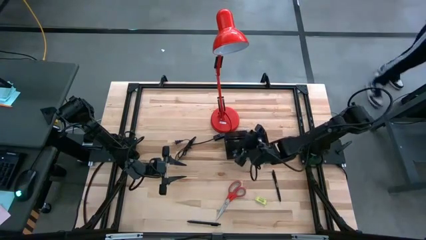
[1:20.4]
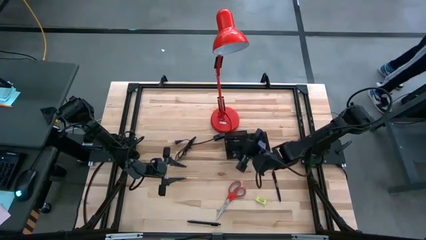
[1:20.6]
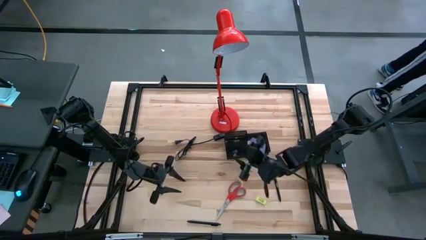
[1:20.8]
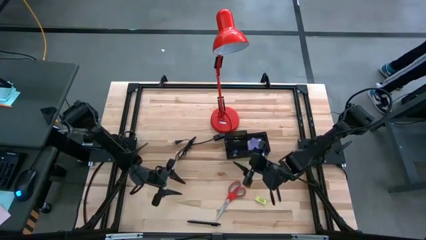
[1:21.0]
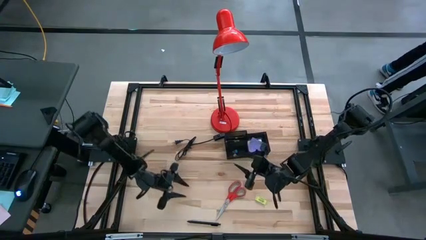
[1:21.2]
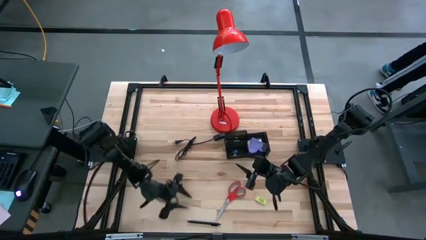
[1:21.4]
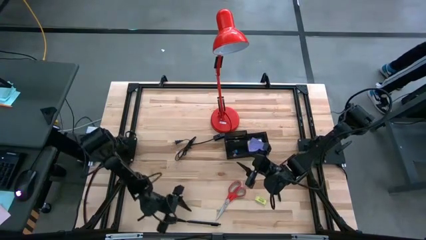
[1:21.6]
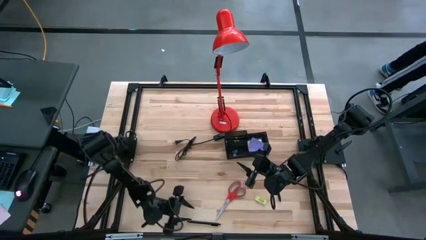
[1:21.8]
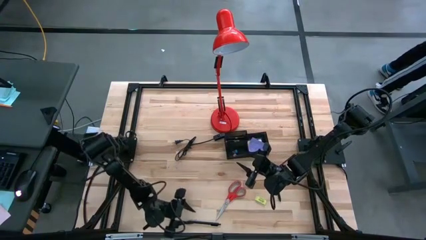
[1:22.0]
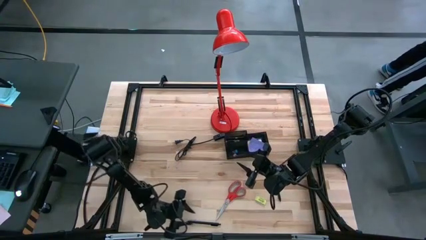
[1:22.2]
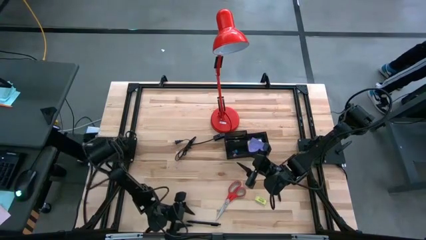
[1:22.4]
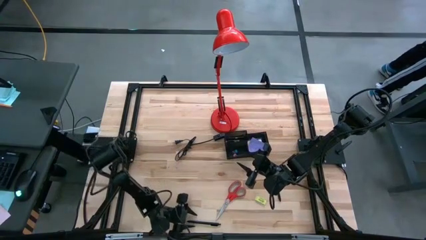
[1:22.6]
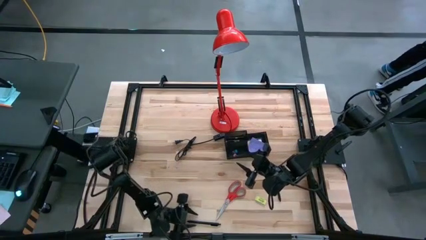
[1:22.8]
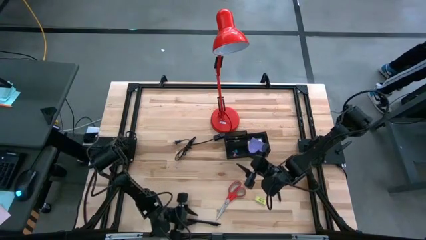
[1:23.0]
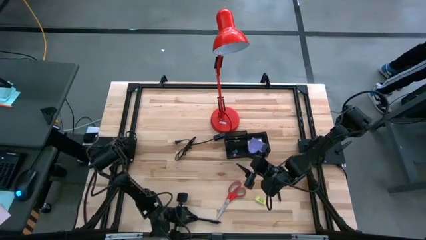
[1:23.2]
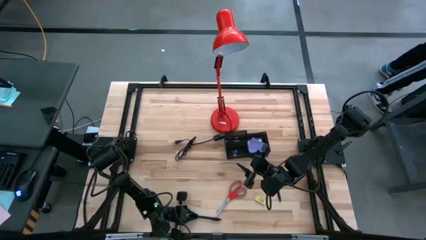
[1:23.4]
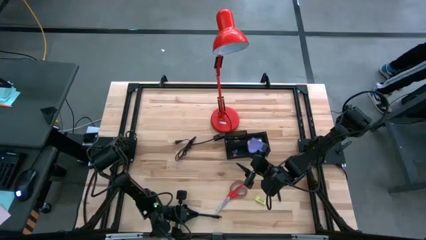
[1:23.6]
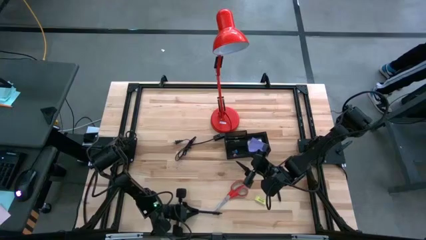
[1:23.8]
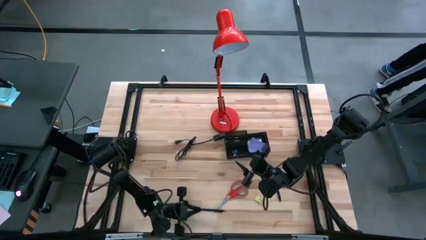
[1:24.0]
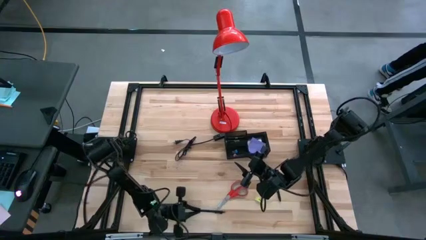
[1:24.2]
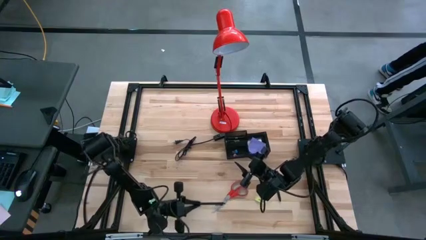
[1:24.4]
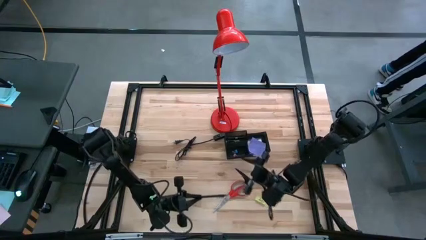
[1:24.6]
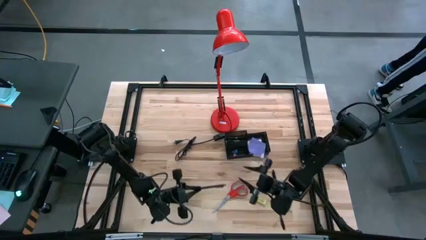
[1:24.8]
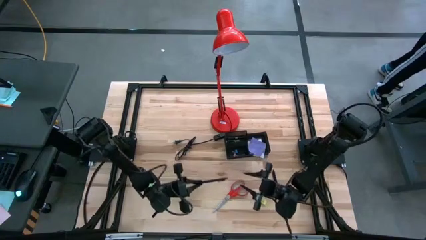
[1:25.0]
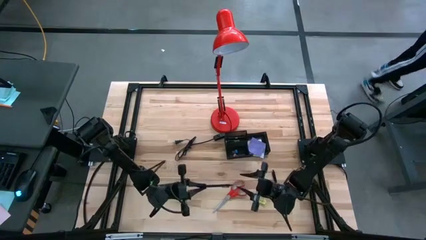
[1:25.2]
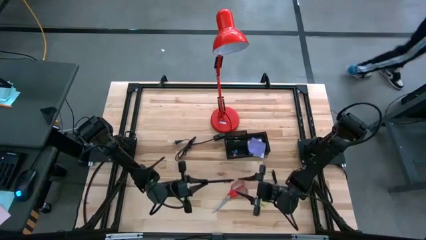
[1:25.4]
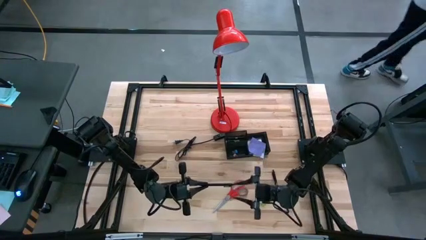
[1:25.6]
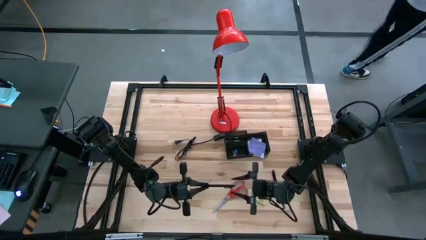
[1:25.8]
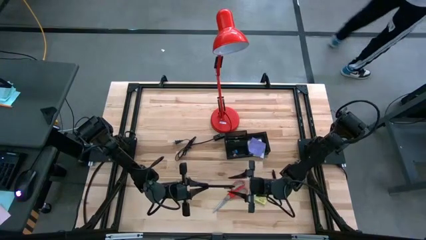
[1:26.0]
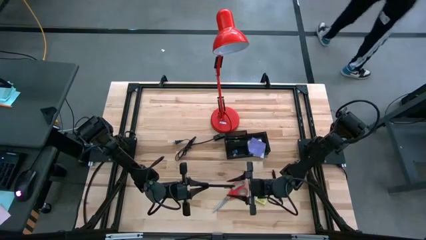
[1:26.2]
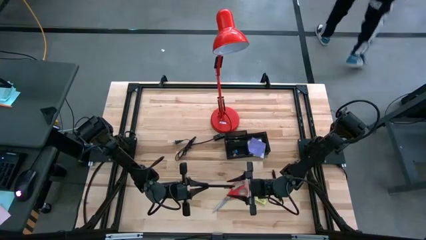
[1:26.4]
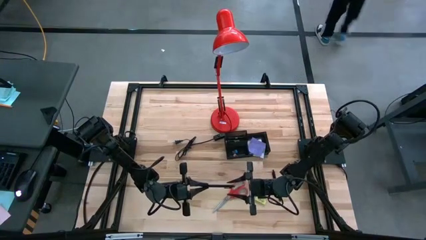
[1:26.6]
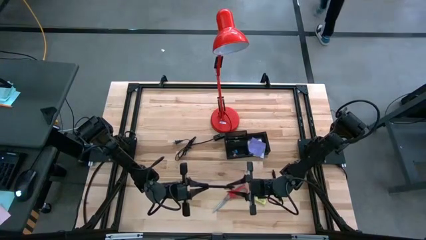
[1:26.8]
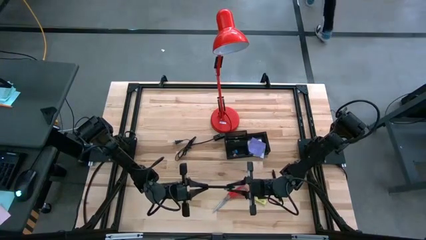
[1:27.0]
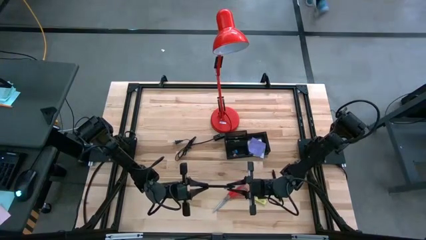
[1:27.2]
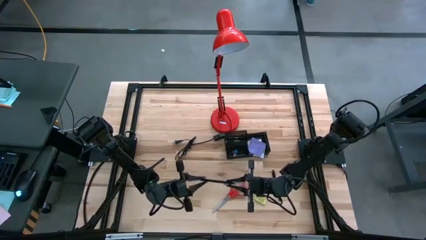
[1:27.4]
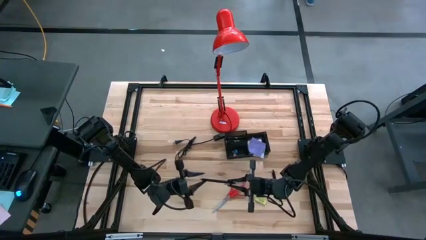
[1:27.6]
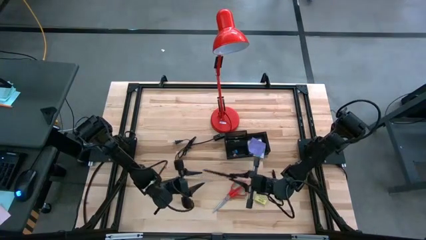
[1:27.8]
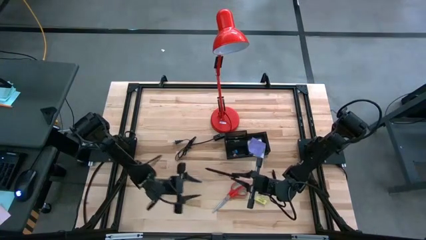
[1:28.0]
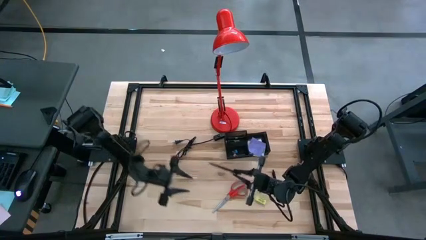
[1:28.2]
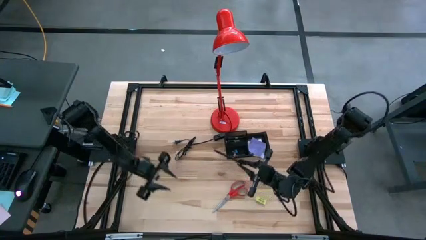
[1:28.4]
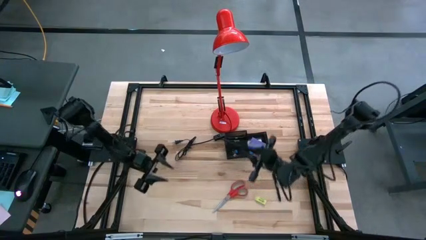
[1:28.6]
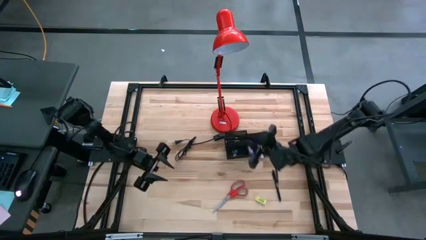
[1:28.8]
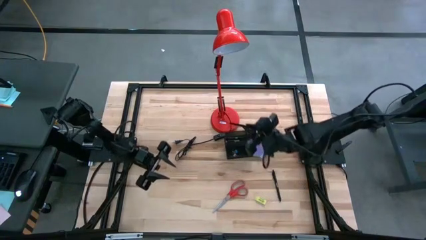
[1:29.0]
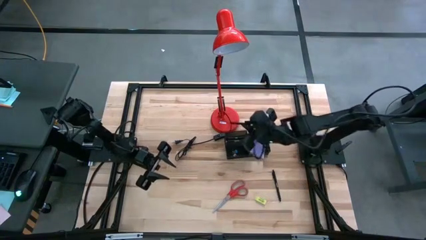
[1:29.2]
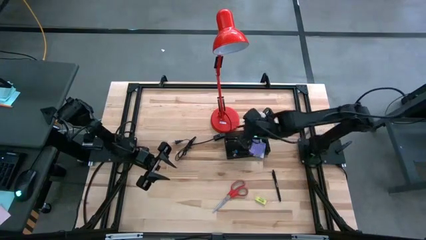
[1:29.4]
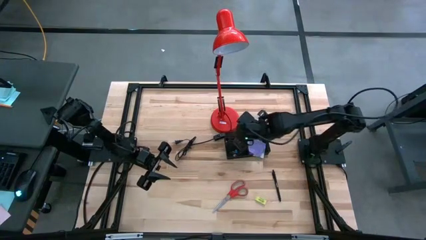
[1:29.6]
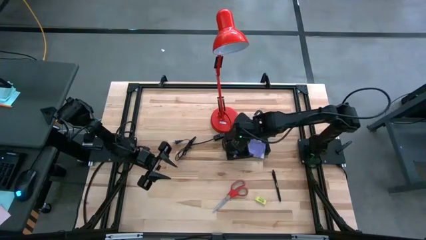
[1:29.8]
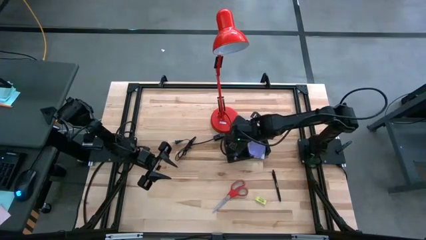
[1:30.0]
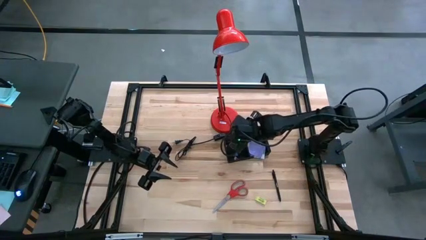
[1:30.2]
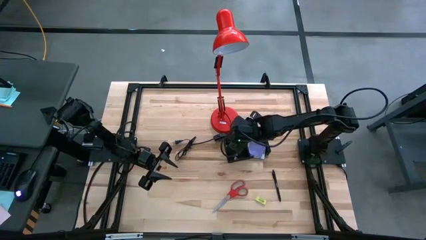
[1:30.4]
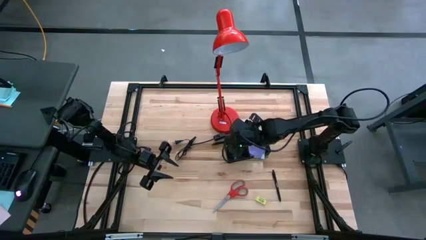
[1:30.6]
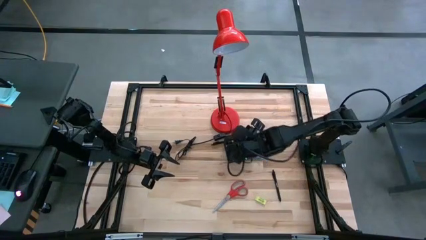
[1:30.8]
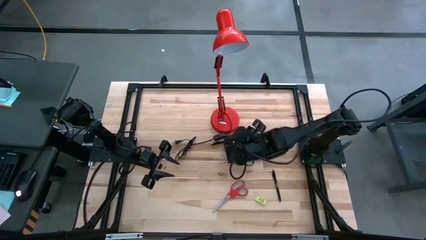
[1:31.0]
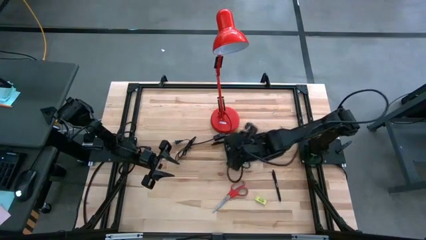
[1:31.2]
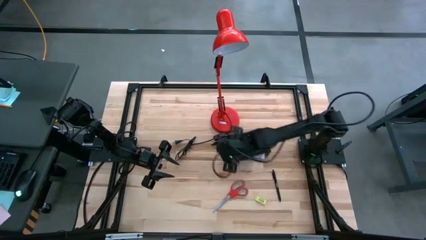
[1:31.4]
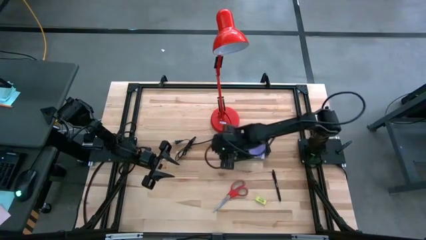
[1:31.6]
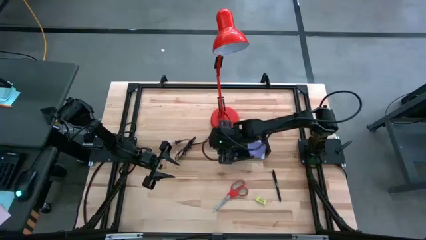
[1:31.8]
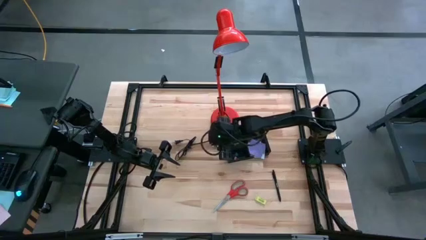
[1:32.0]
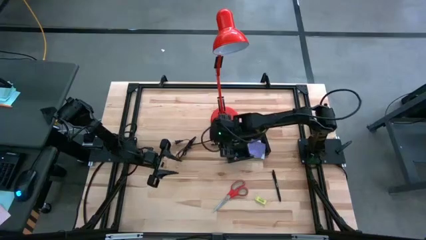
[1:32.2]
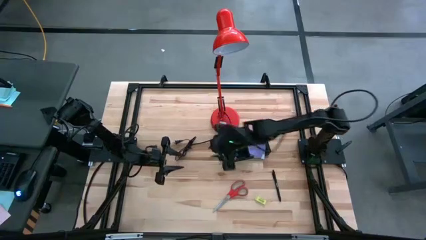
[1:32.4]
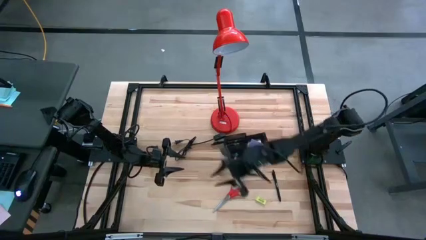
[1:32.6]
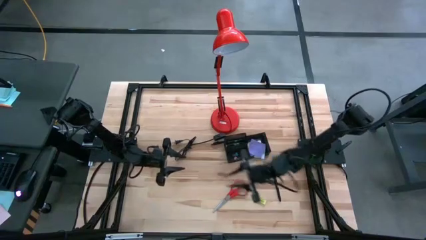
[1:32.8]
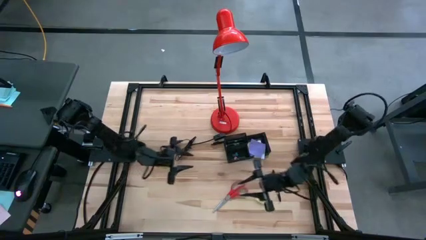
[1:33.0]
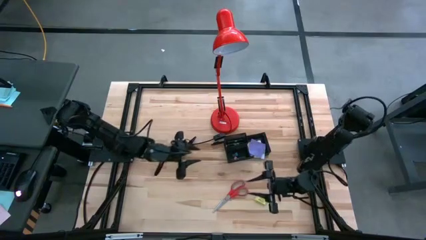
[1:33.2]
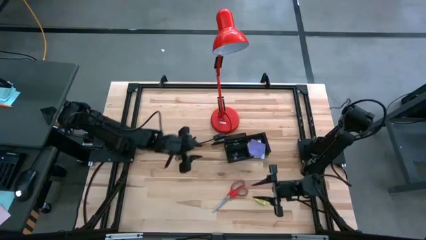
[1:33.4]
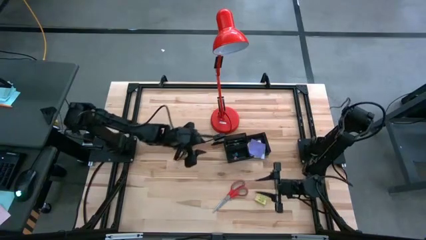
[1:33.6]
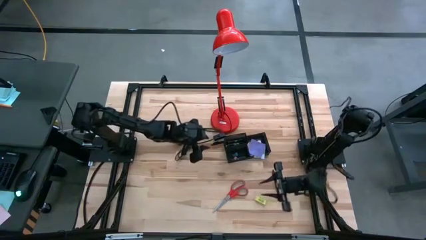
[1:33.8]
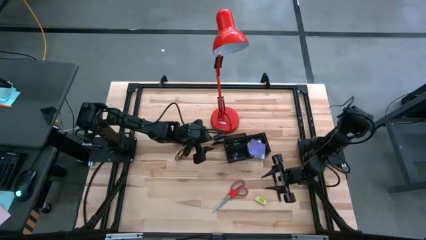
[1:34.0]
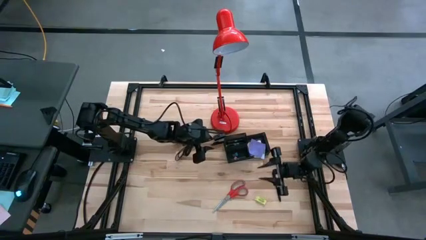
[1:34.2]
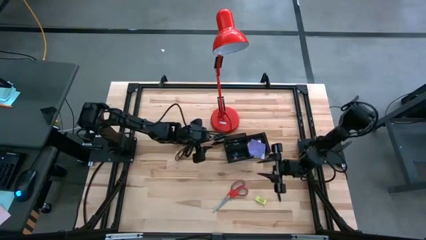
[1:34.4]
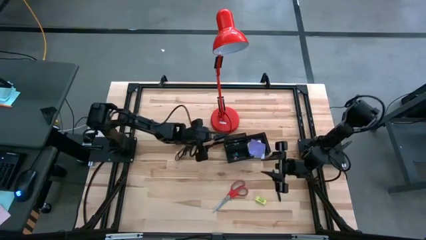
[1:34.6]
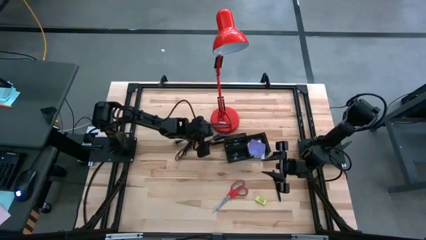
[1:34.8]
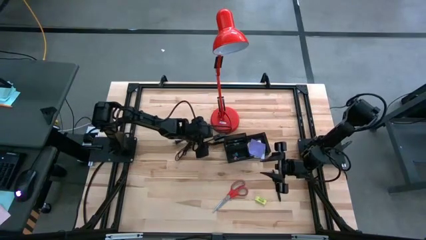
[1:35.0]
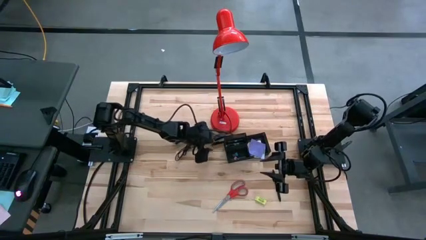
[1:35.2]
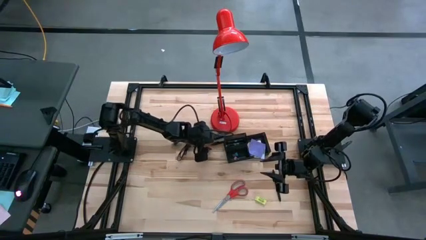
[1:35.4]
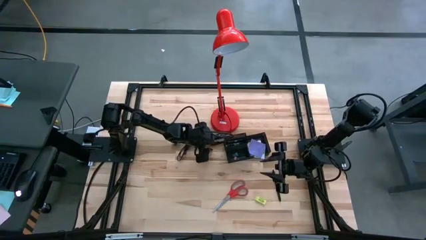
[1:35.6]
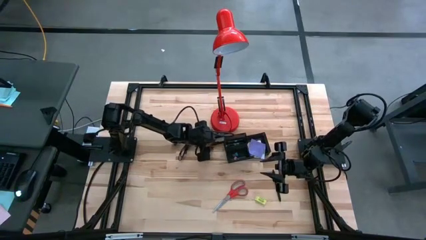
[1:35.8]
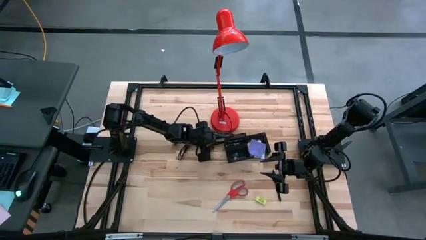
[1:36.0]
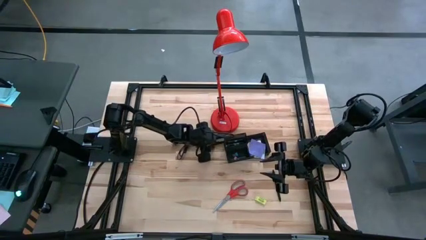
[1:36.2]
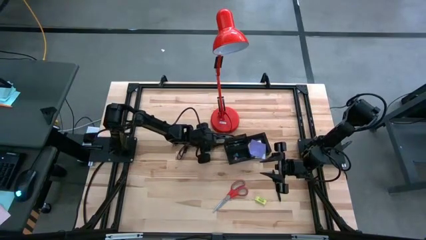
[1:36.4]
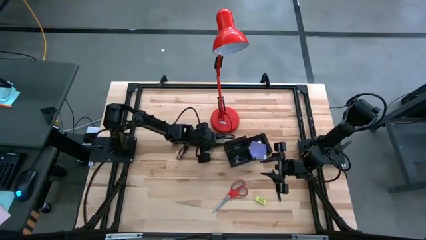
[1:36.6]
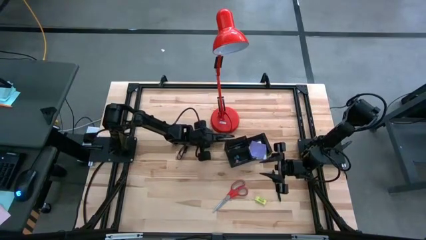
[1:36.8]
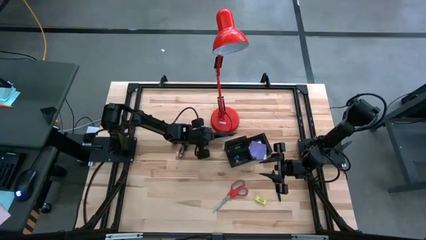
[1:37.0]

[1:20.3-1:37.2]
Task: Pick and place office supplies into organizer
Put the black pen into the desk organizer
